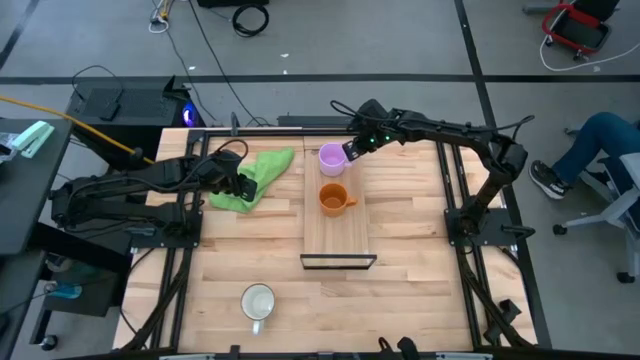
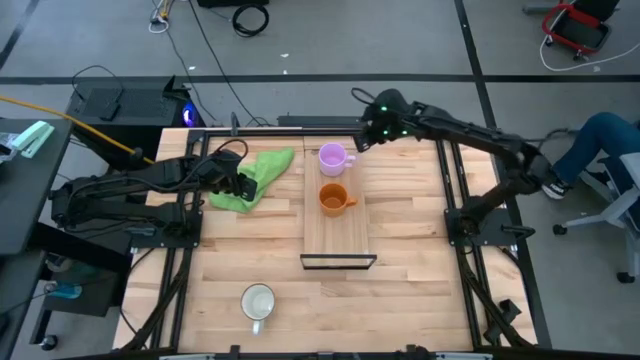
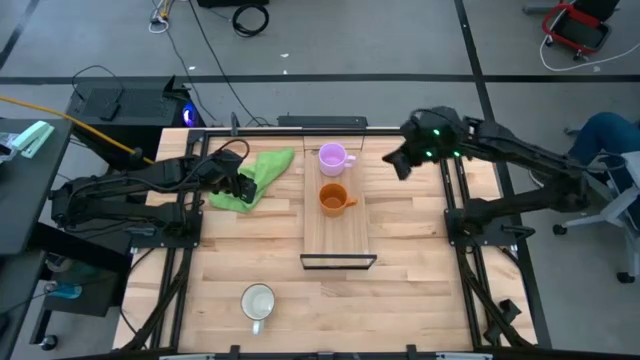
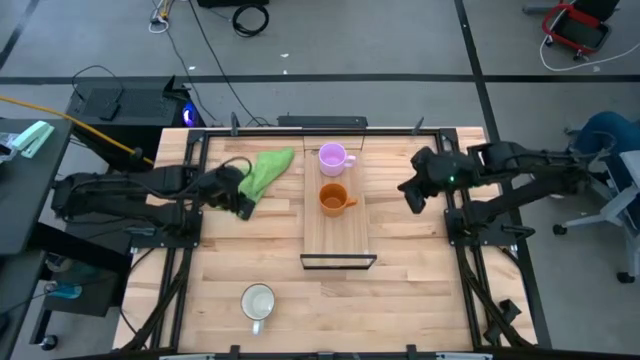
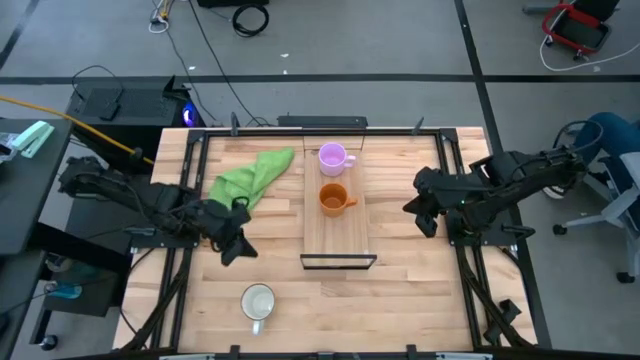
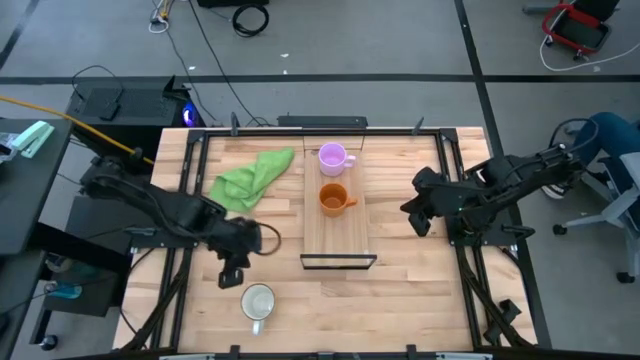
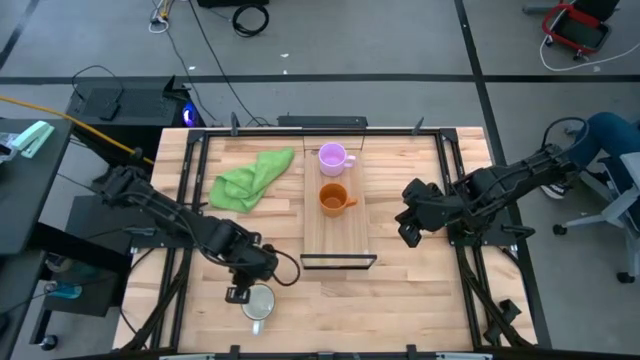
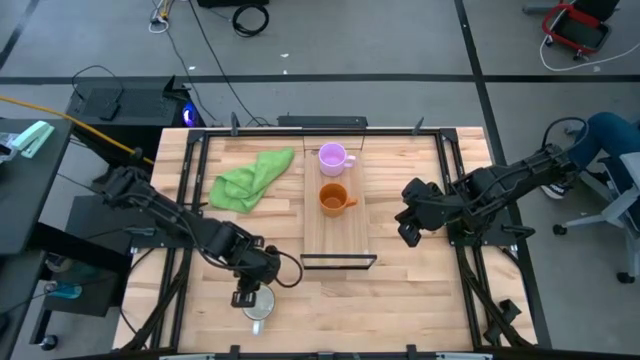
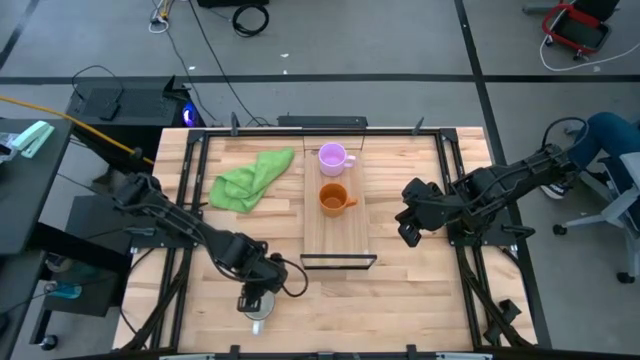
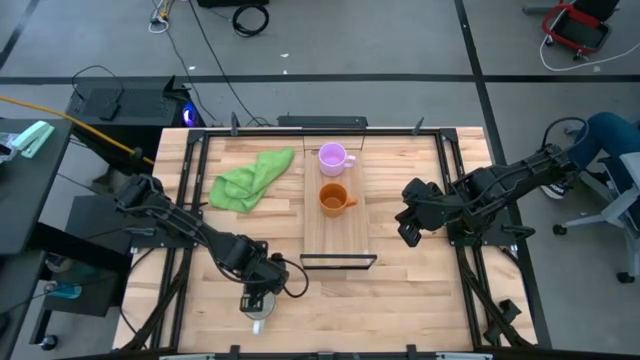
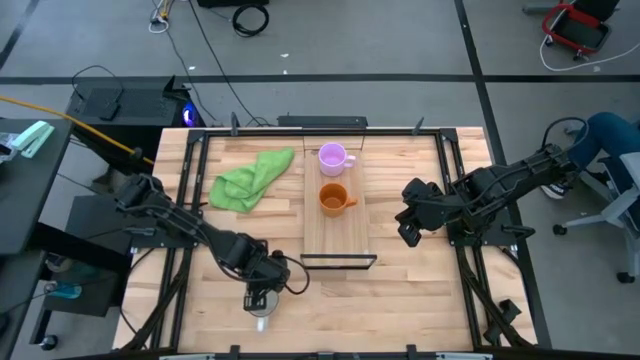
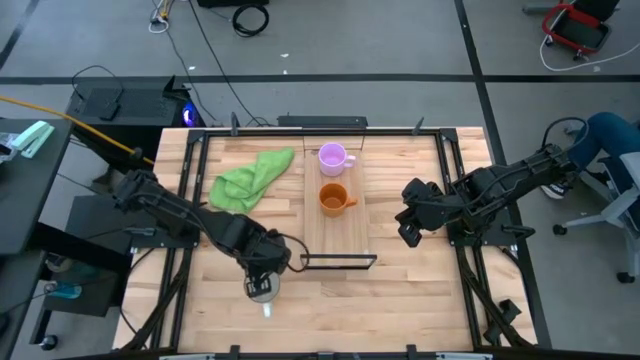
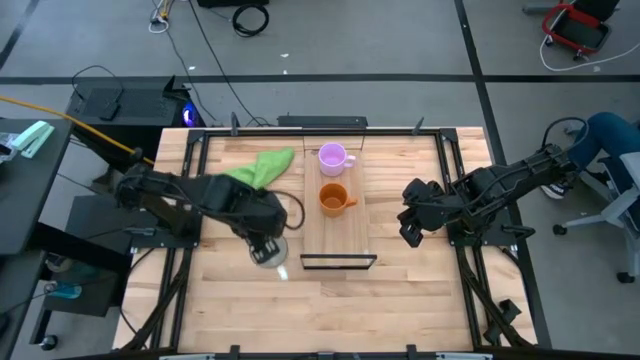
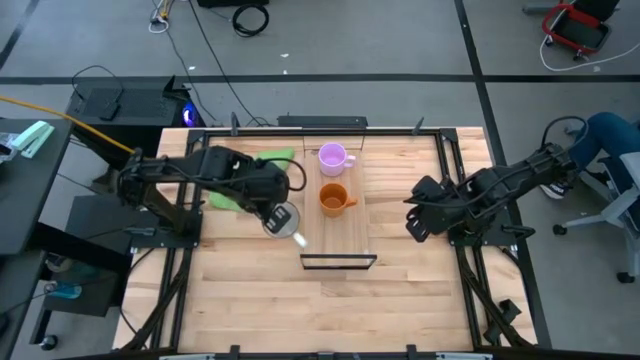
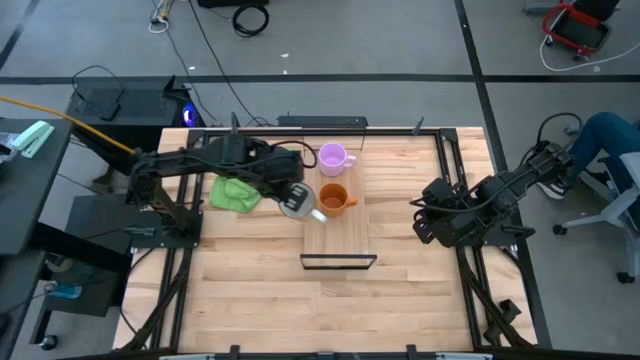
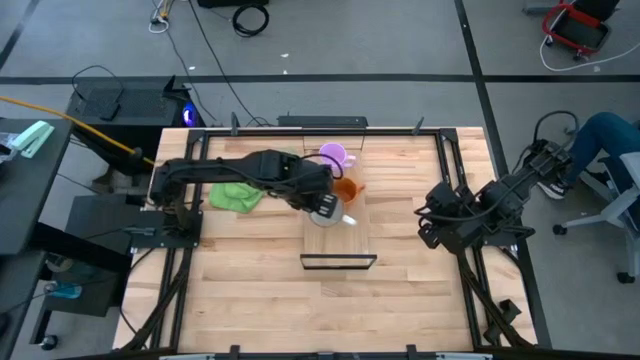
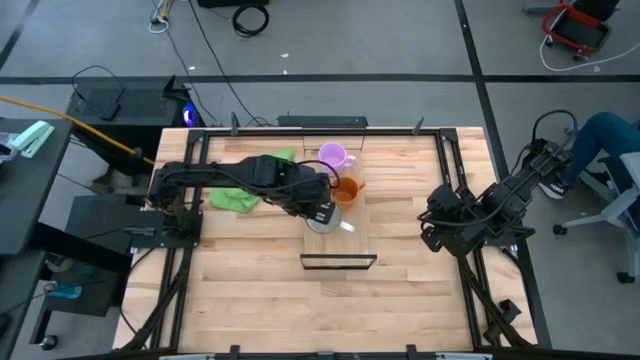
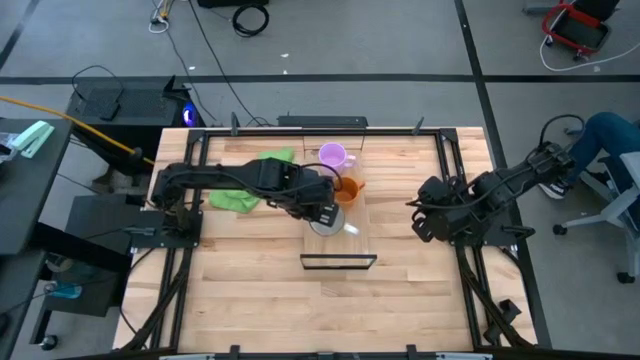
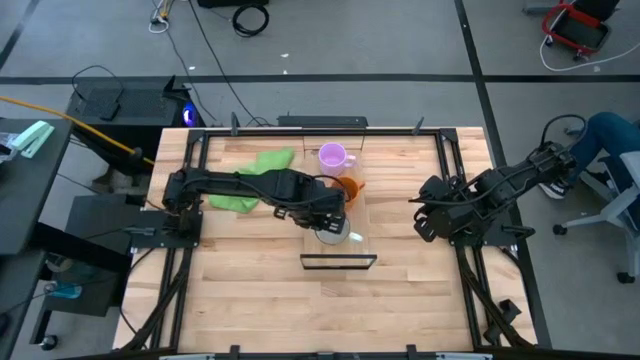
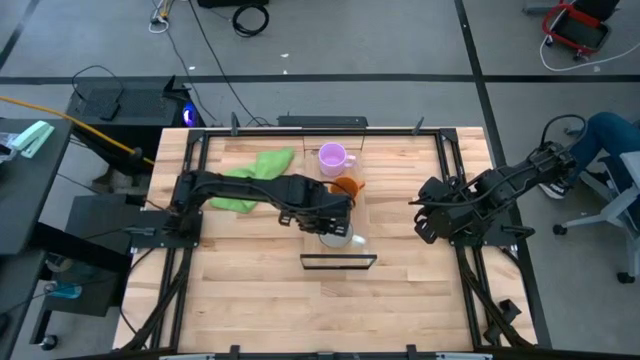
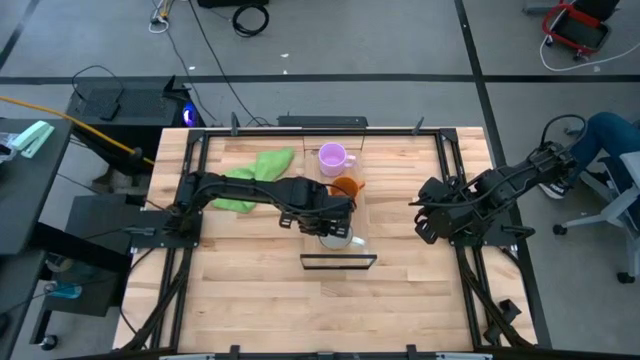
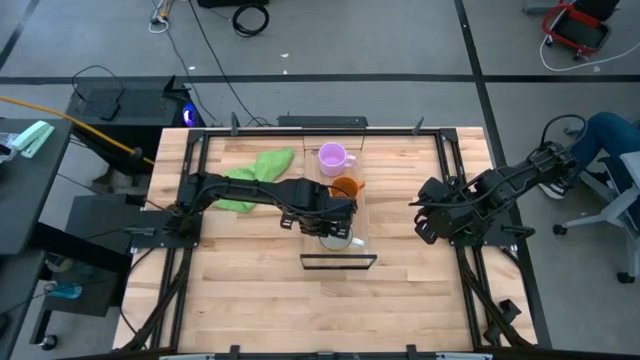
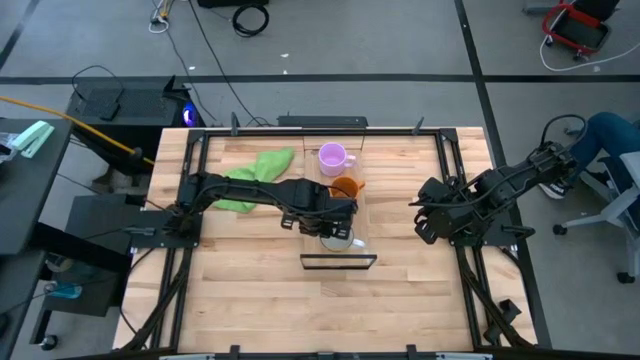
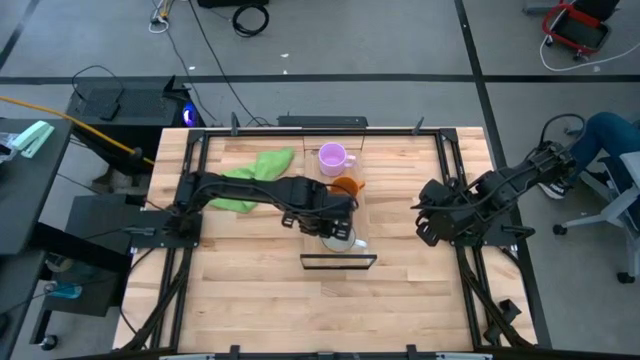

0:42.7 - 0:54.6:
Task: Stack small to large cups/mugs on shelf
Put the yellow mug on the shelf

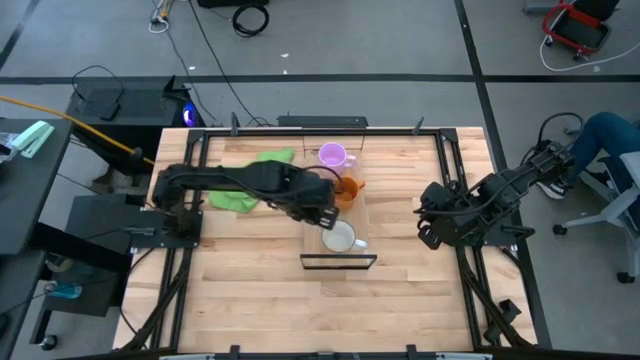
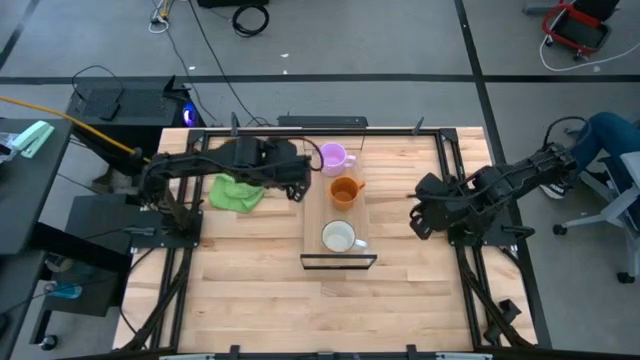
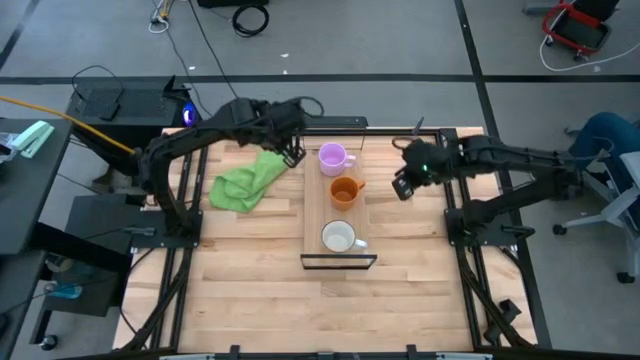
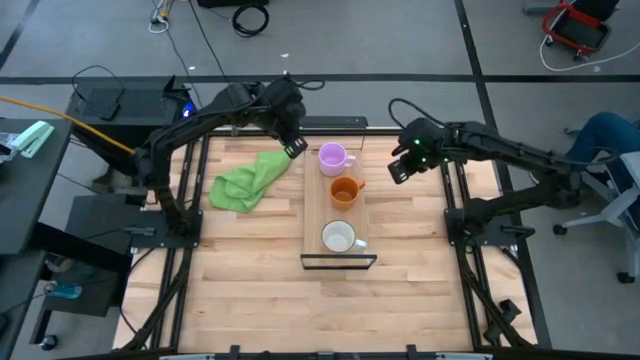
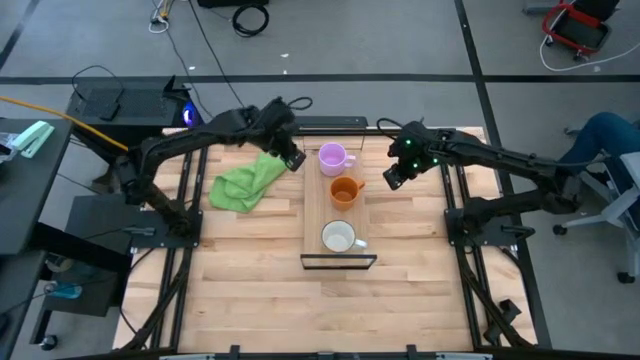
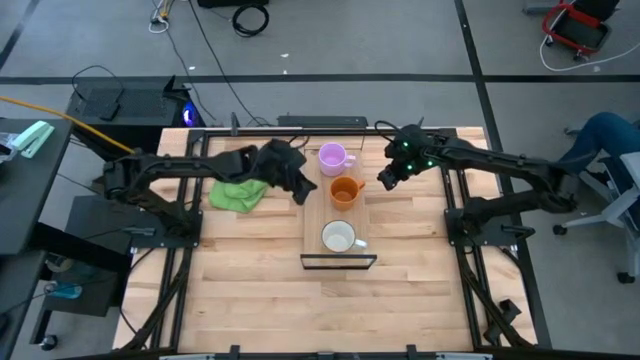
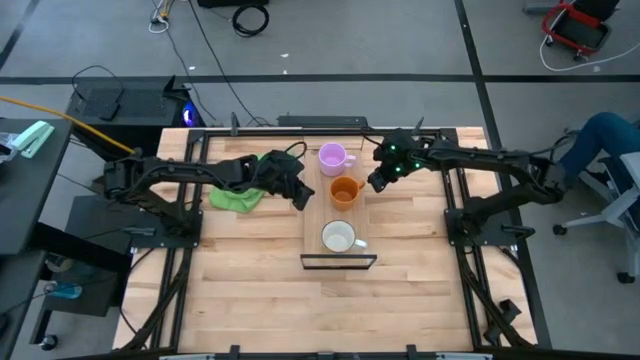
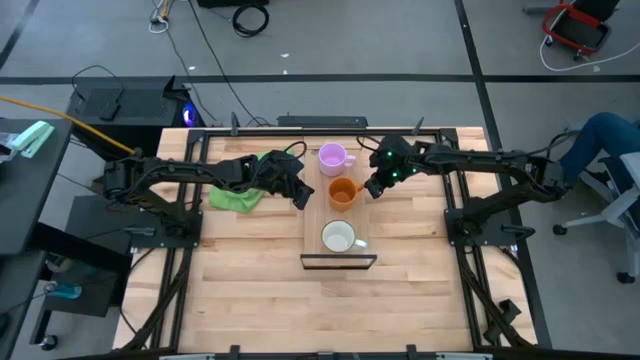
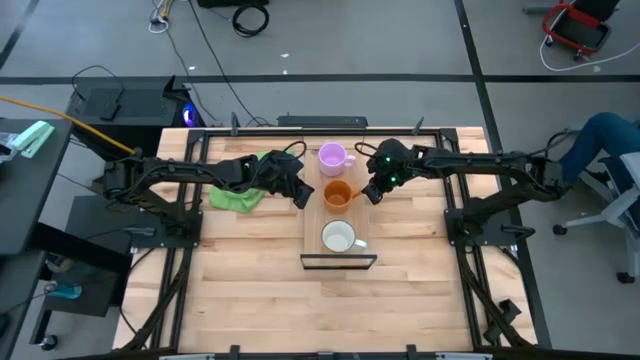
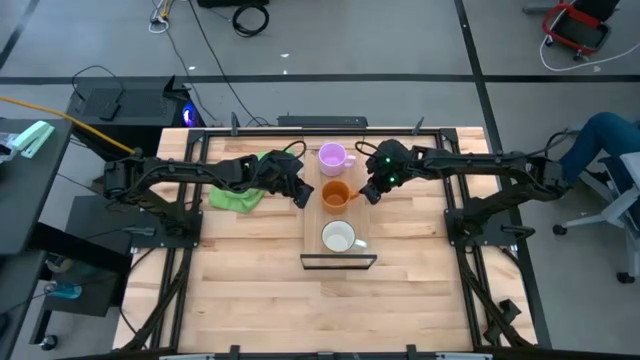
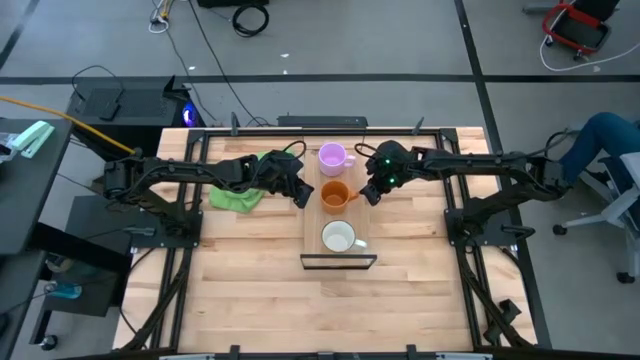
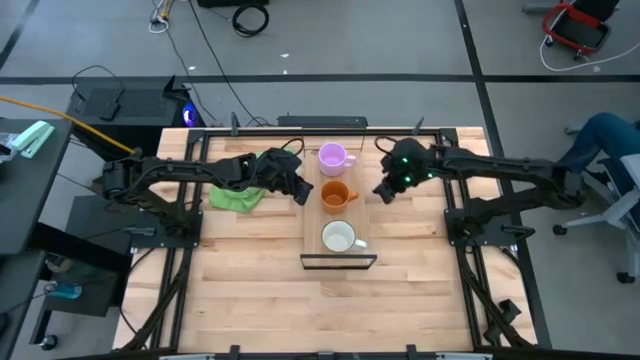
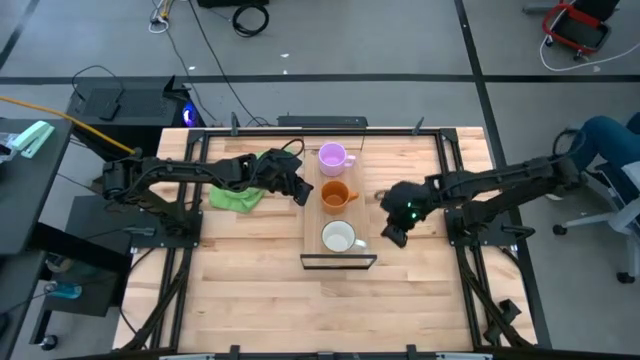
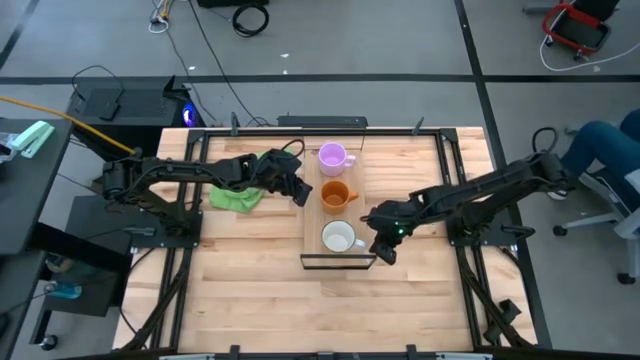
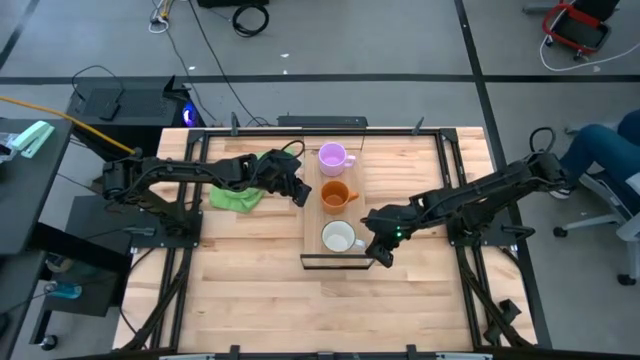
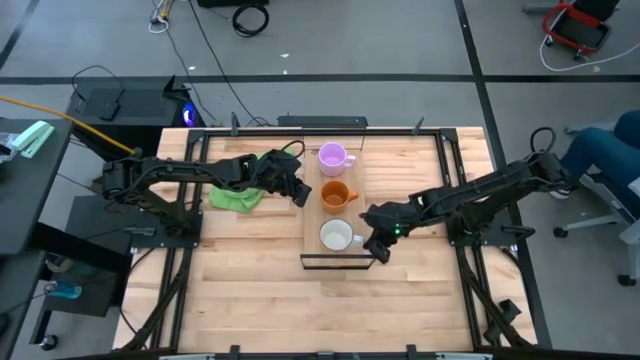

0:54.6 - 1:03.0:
Adjust the mugs on the shelf

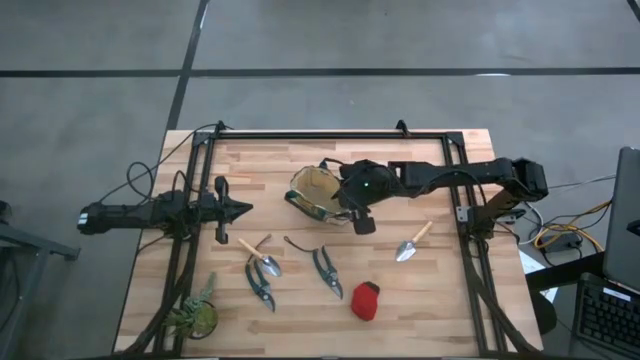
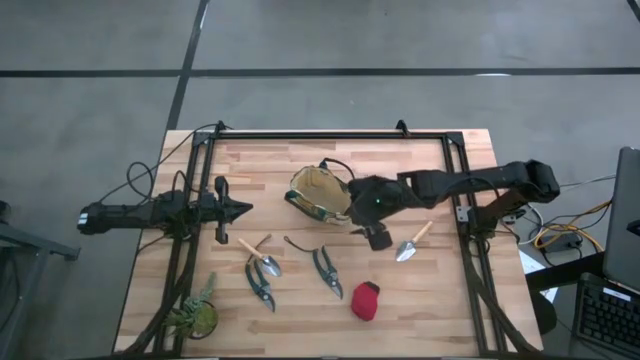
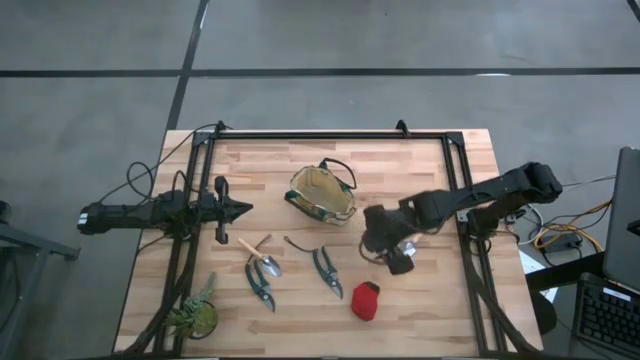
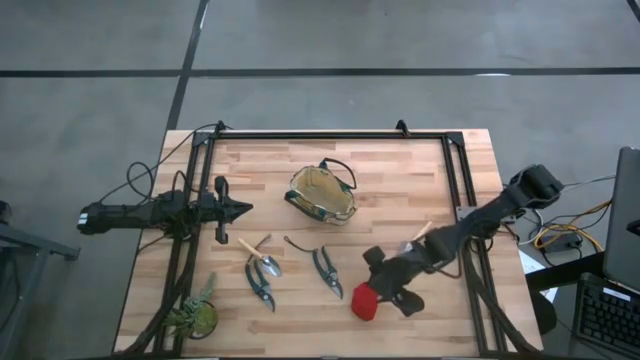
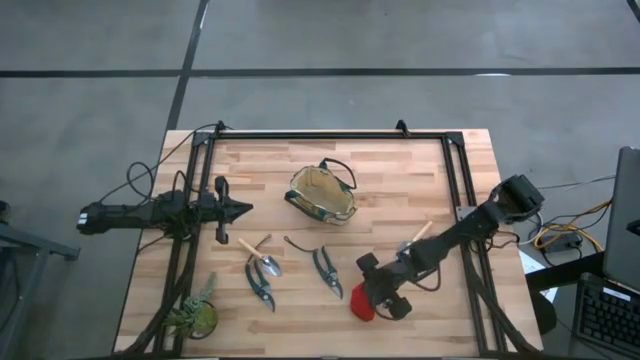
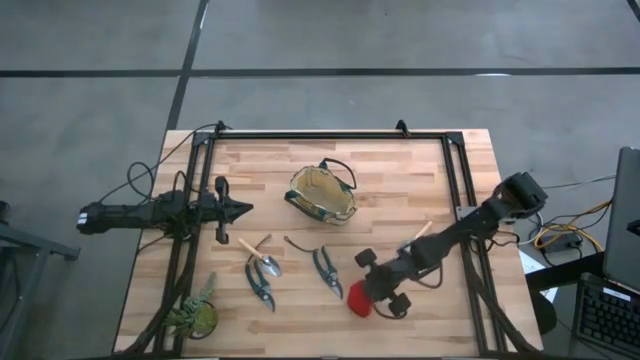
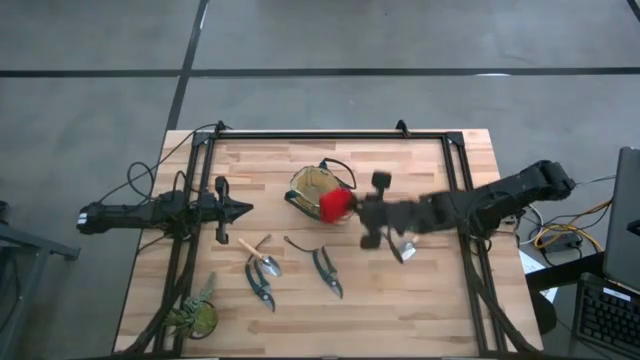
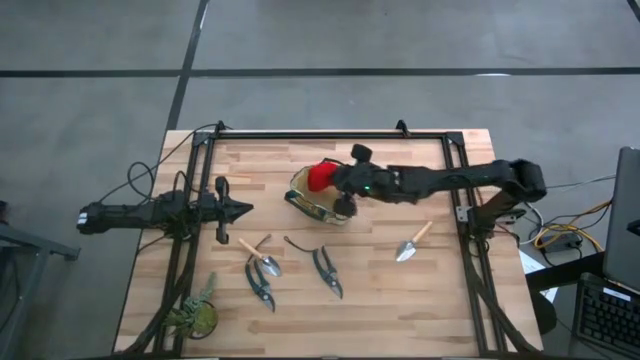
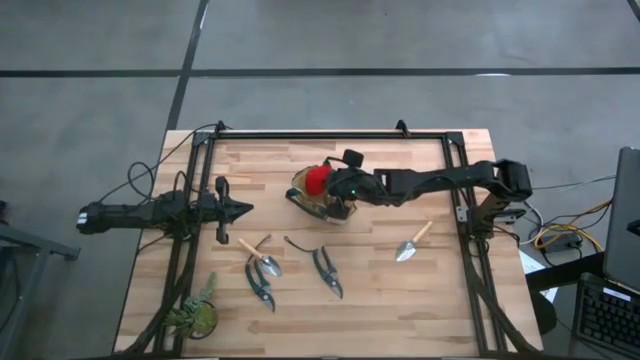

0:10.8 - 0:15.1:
Task: Pick & Place Garden tools in Gardening bag
Put the red gloves into the gardening bag
